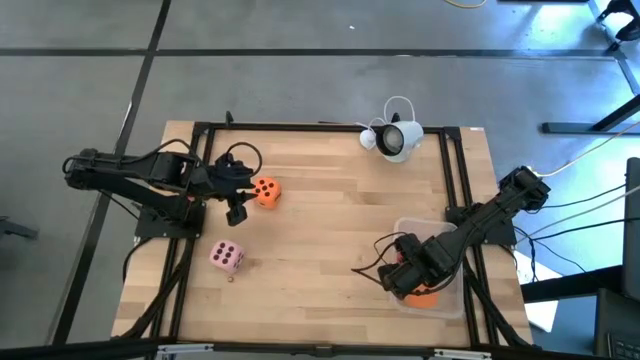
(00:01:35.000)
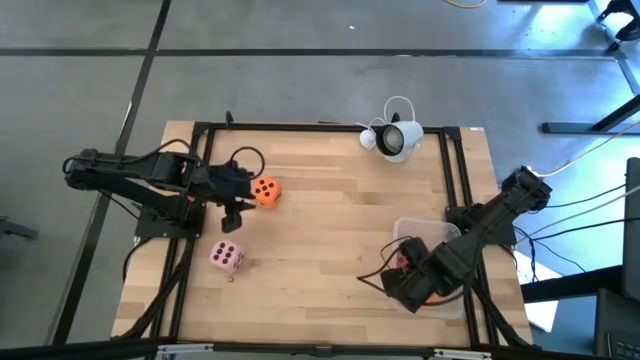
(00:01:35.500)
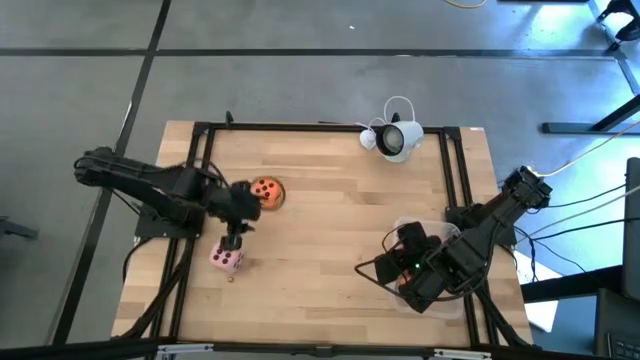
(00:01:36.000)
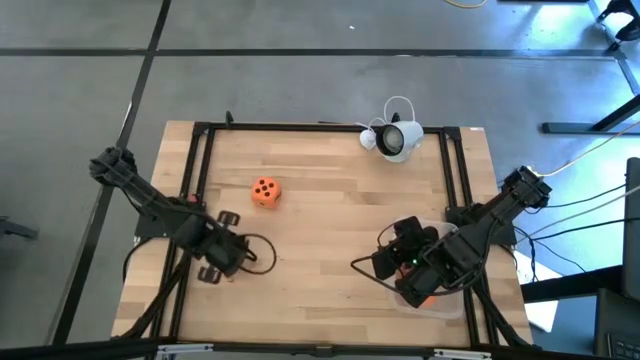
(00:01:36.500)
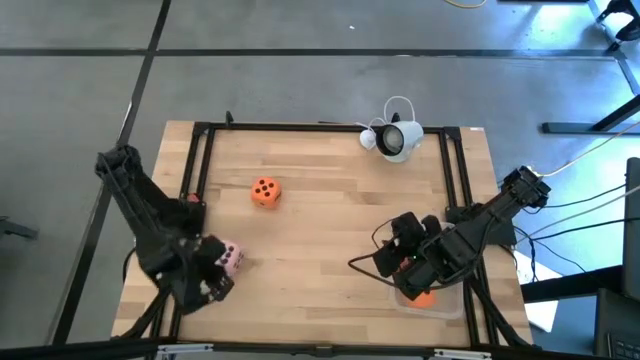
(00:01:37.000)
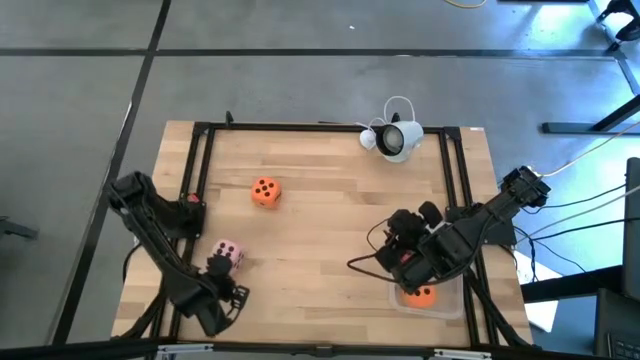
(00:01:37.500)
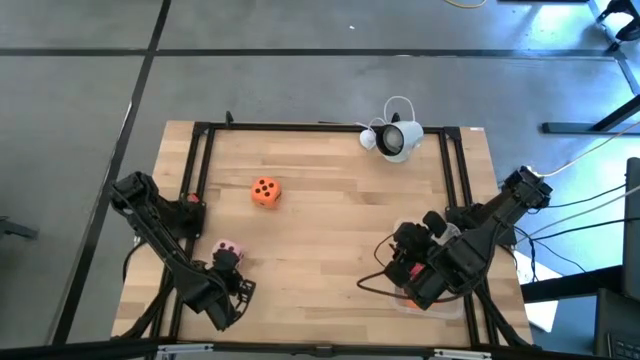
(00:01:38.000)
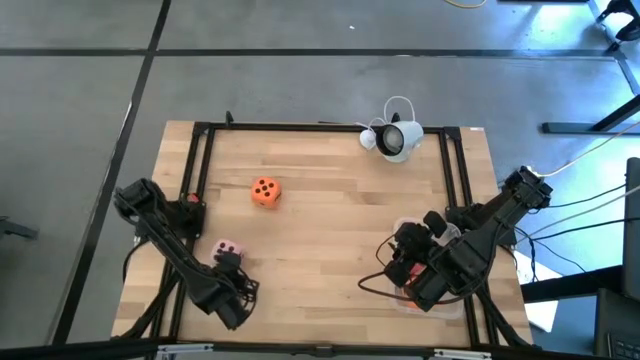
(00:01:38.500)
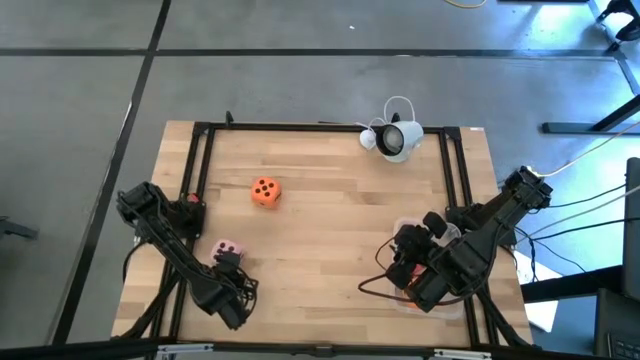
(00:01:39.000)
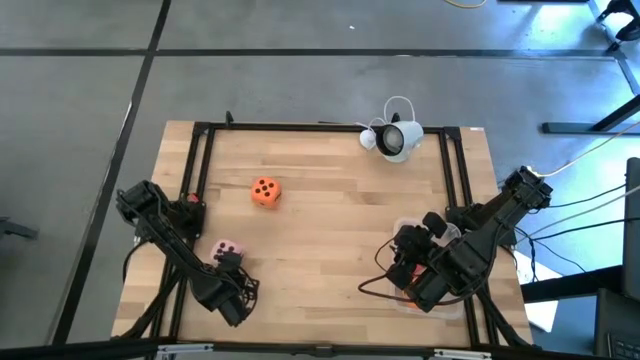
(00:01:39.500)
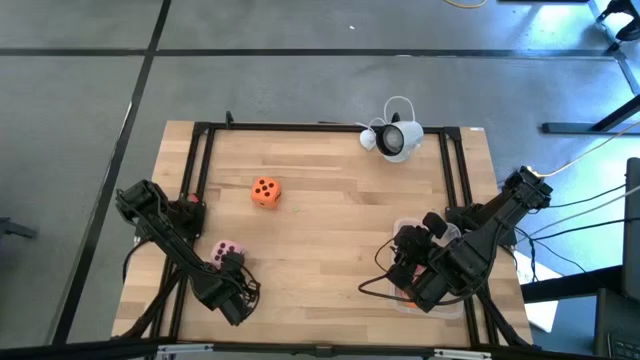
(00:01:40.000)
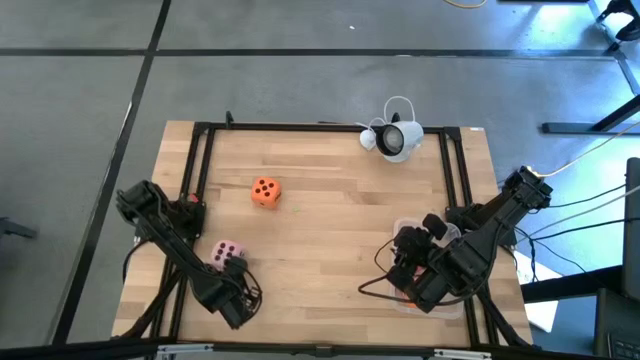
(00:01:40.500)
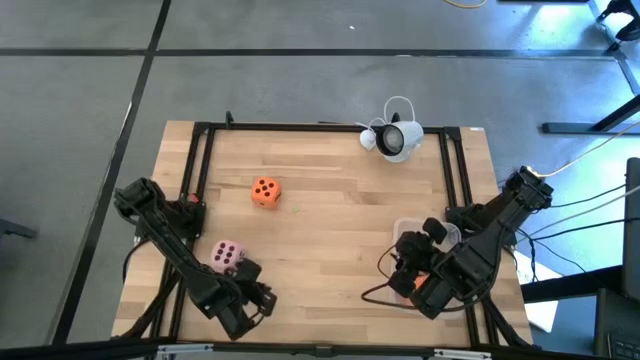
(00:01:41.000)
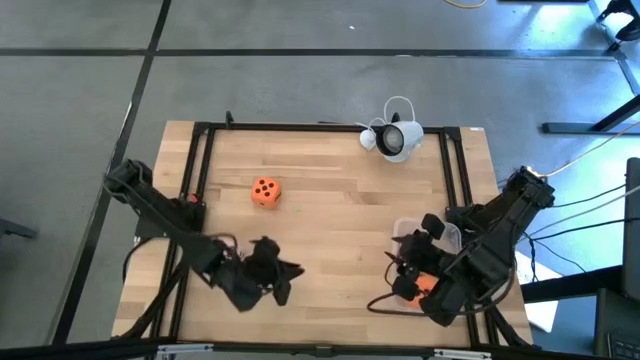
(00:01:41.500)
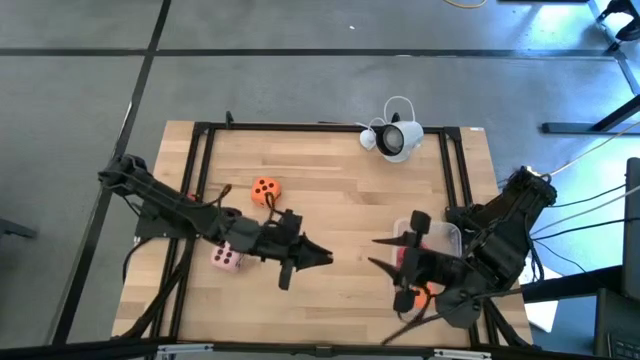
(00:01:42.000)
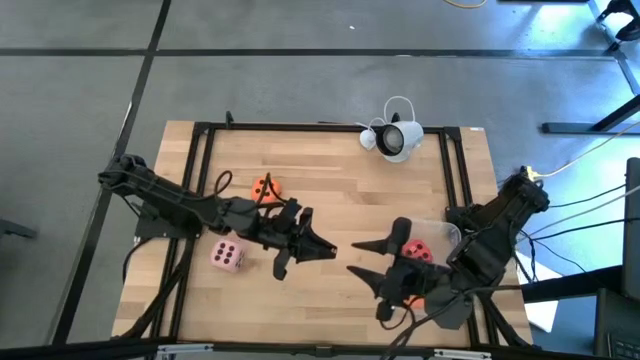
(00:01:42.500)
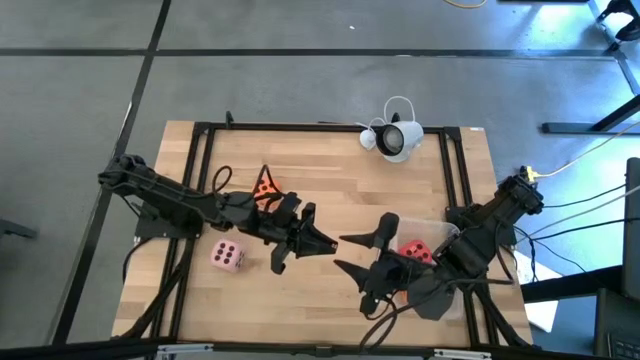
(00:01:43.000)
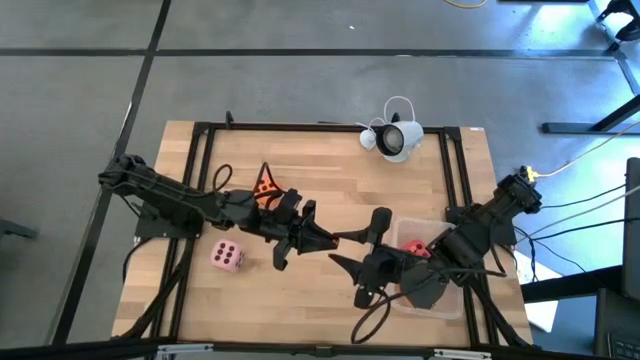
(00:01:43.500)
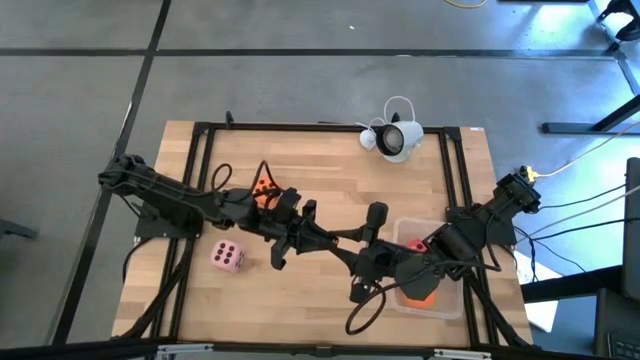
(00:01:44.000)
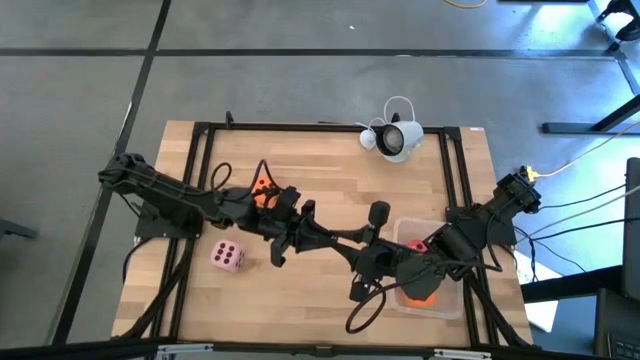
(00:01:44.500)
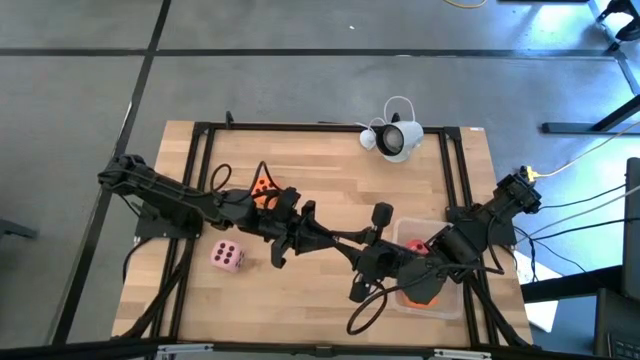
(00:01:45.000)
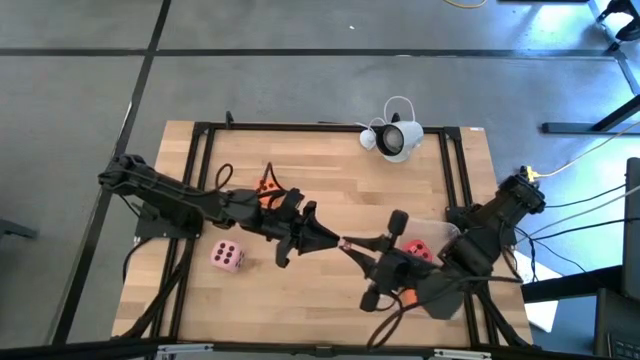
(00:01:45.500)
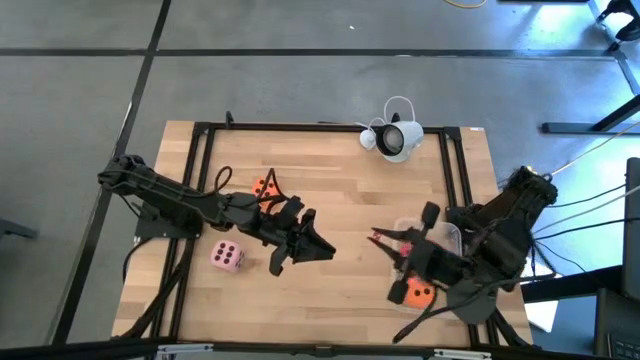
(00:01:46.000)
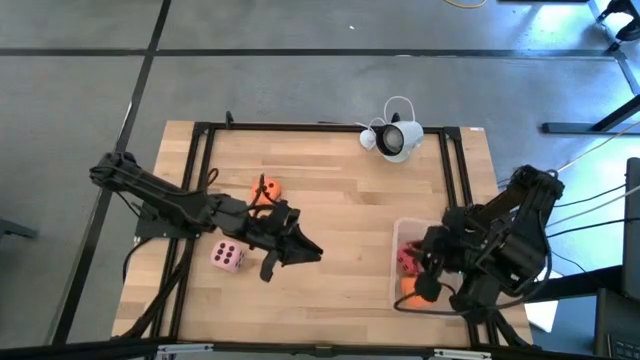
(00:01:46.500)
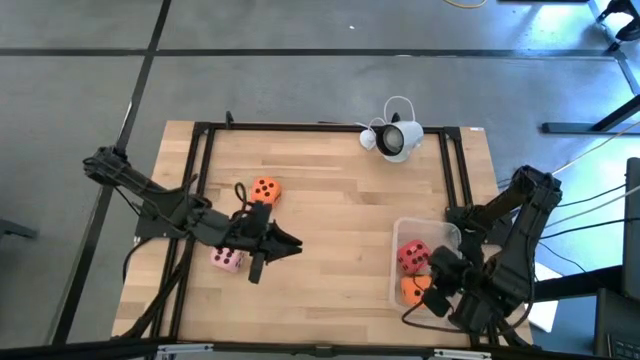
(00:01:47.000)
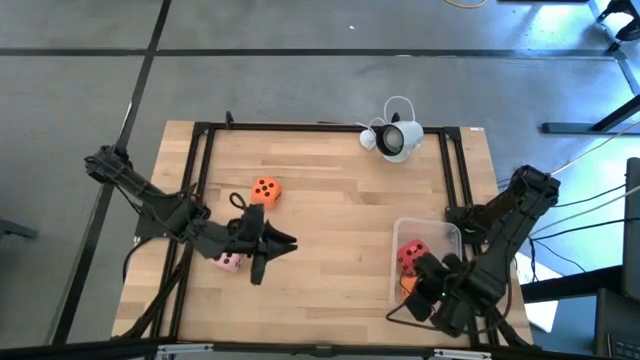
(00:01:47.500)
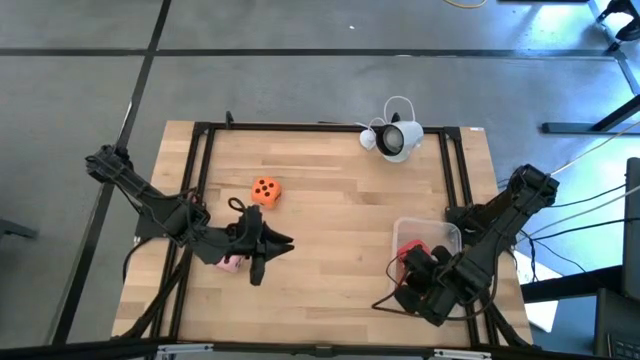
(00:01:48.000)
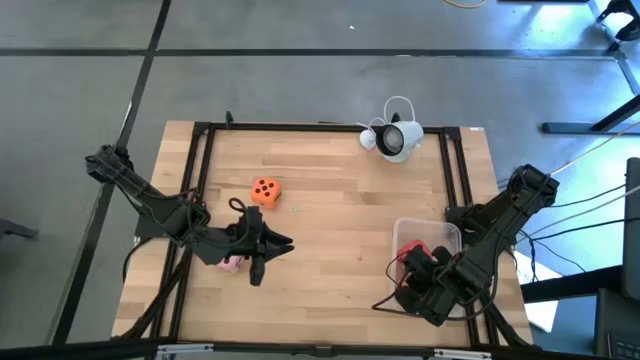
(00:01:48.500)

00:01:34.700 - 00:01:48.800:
Task: Pick & Place Dice
Put the small red die into the transparent bin

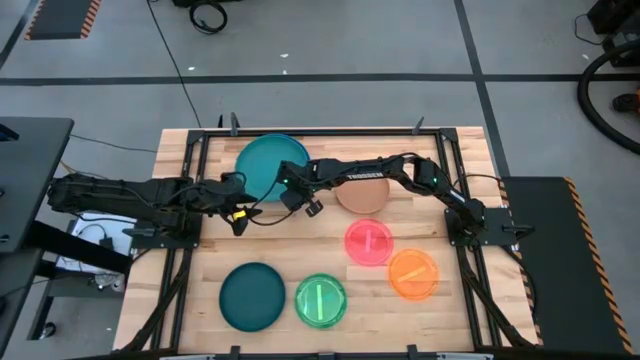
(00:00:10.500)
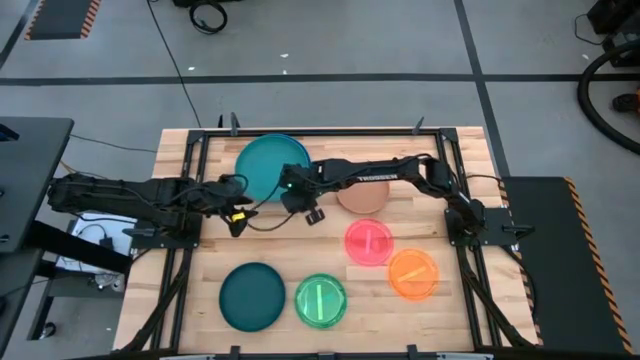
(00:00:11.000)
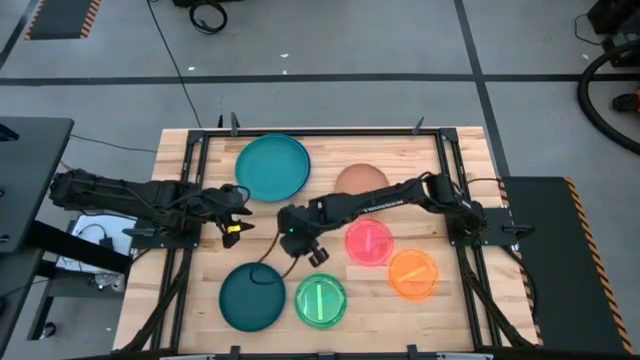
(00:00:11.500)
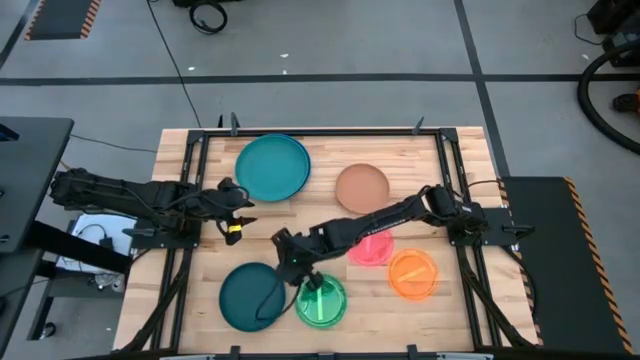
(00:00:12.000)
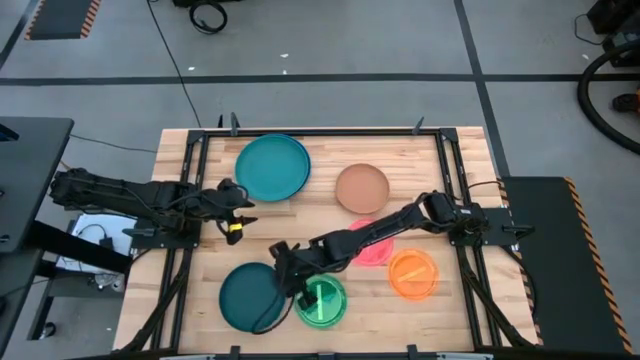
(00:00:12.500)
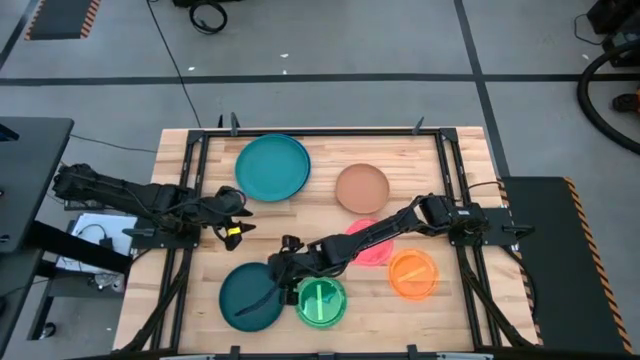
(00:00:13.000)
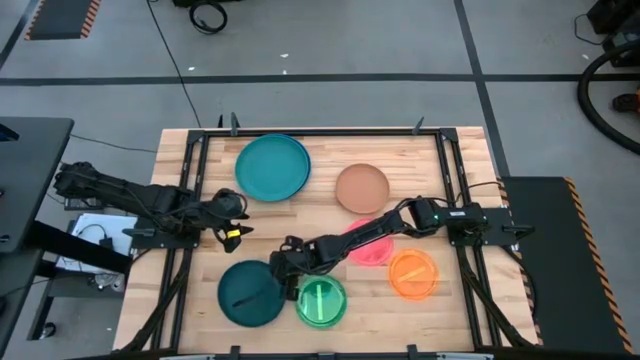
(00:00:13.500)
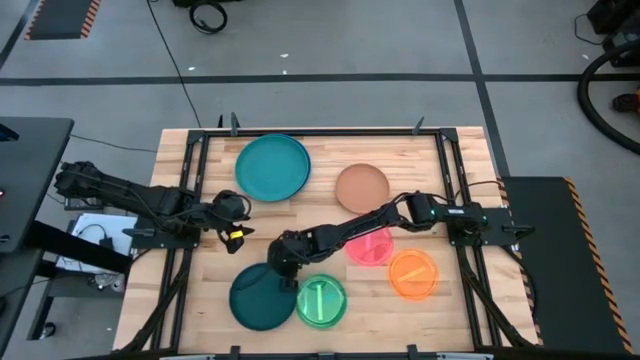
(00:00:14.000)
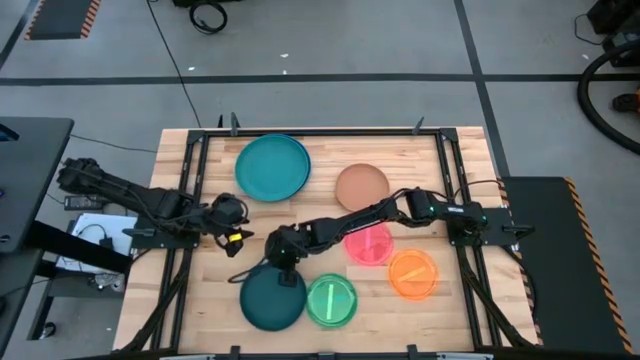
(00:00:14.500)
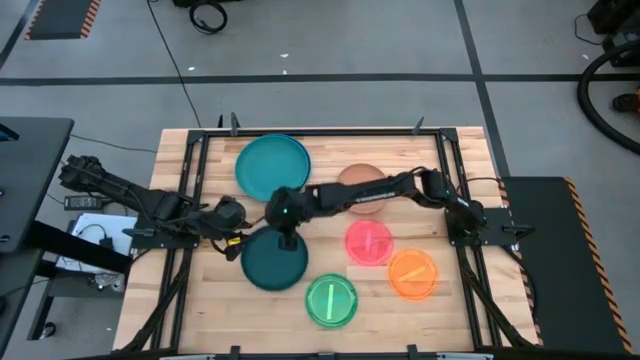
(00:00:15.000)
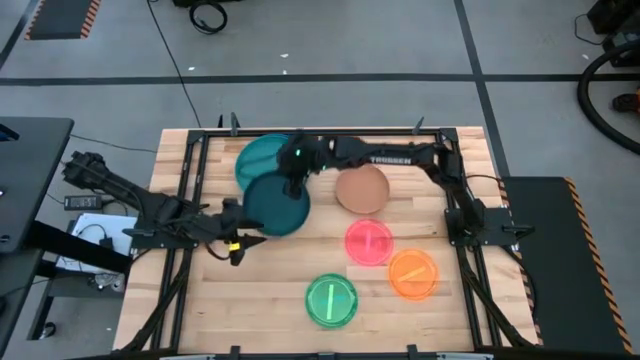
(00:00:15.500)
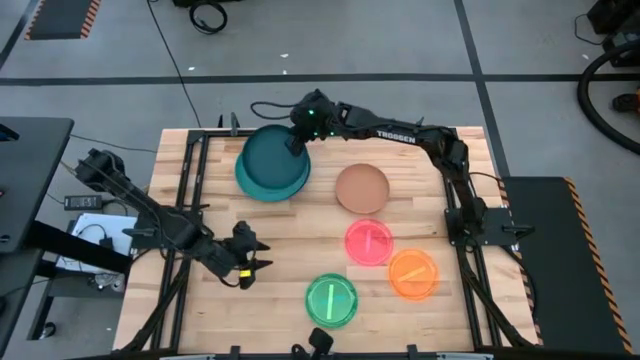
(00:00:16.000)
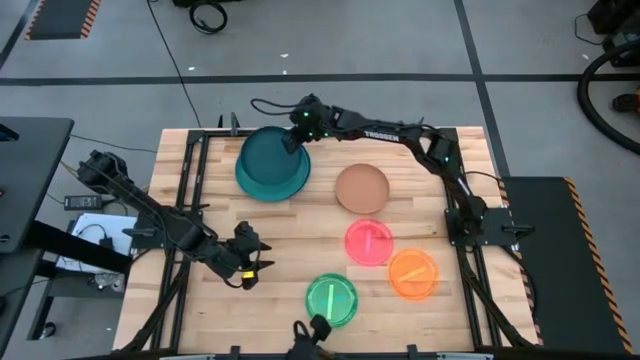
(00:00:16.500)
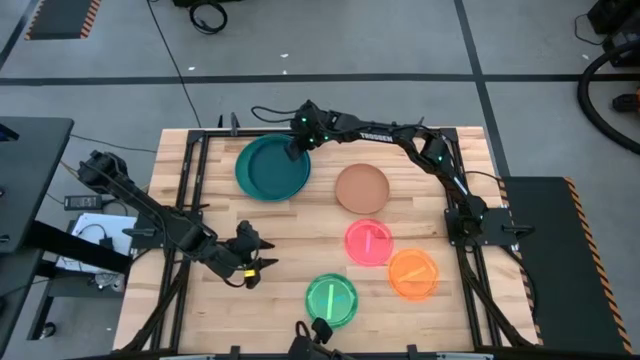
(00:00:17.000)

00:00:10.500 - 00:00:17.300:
Task: Stack plastic plates
Stack the dark green plate on top of the green plate
